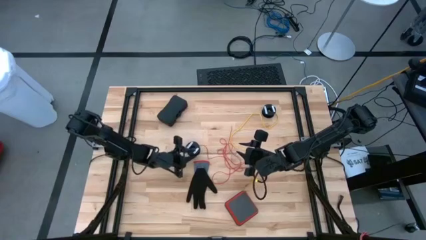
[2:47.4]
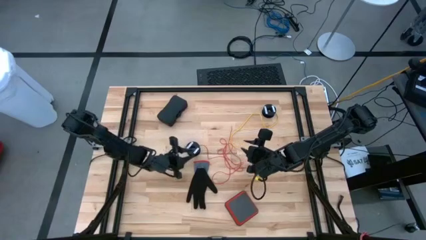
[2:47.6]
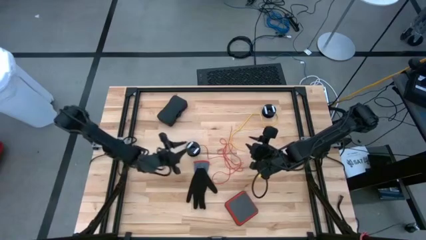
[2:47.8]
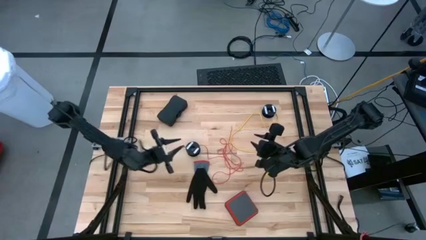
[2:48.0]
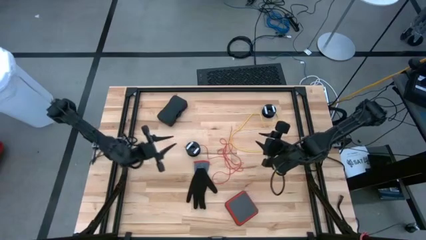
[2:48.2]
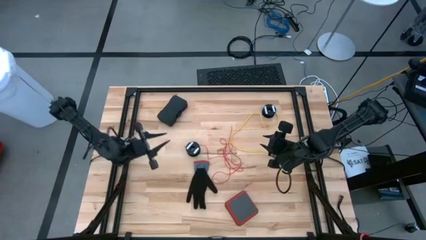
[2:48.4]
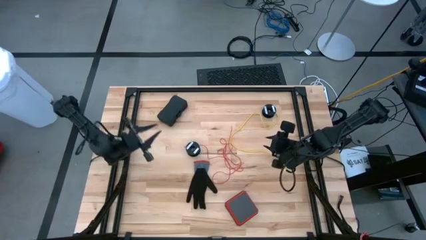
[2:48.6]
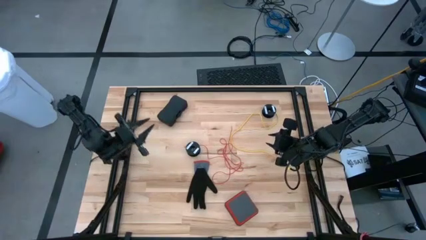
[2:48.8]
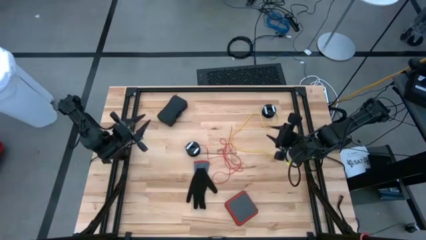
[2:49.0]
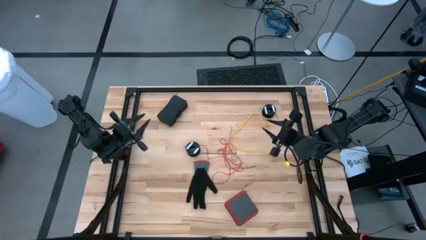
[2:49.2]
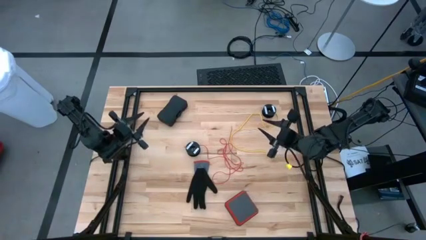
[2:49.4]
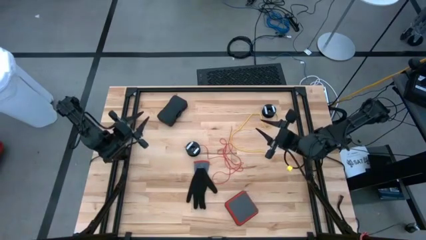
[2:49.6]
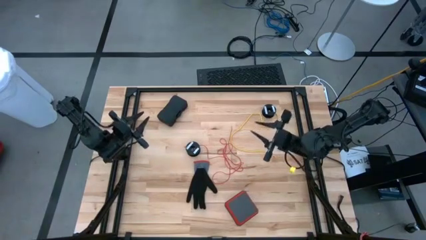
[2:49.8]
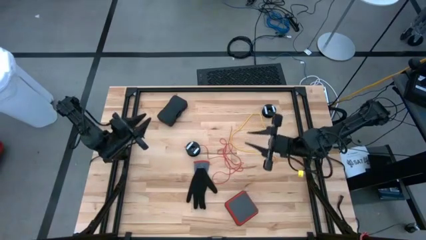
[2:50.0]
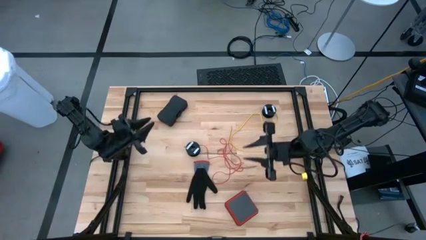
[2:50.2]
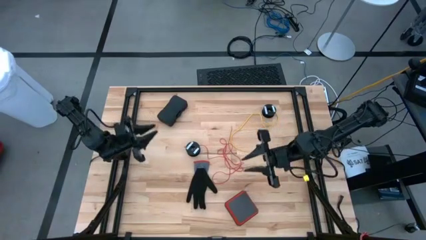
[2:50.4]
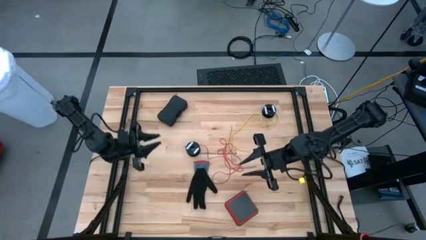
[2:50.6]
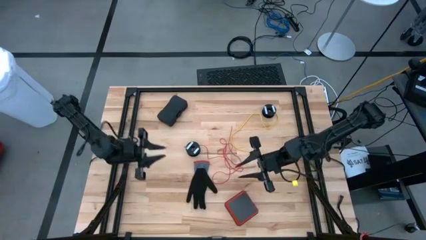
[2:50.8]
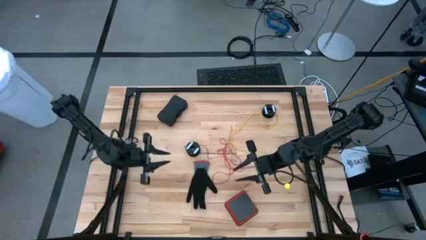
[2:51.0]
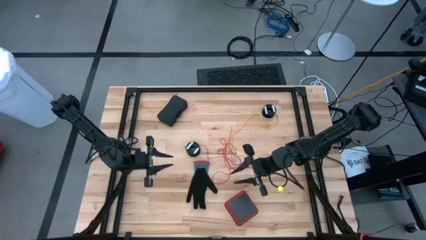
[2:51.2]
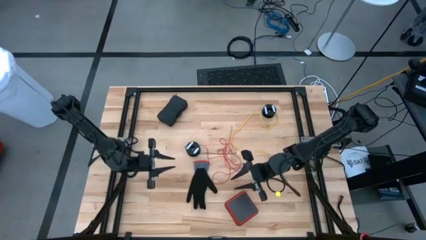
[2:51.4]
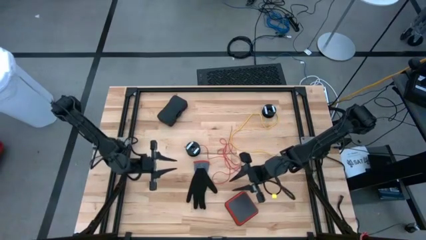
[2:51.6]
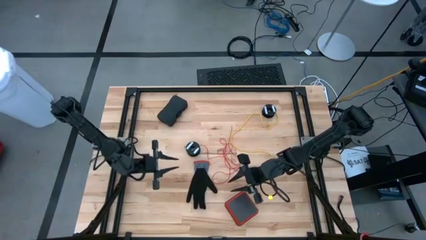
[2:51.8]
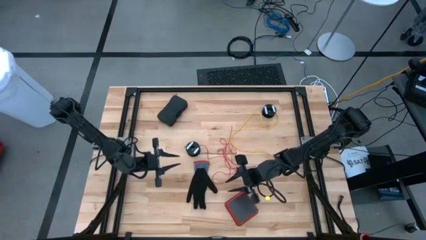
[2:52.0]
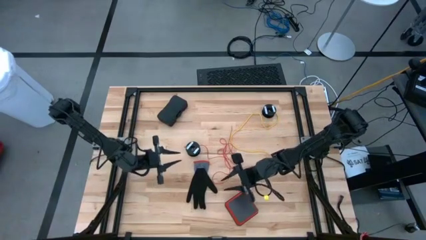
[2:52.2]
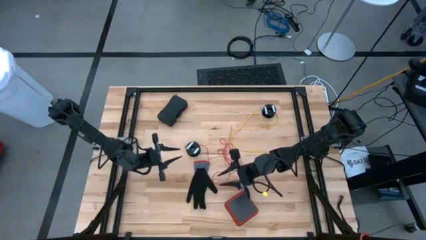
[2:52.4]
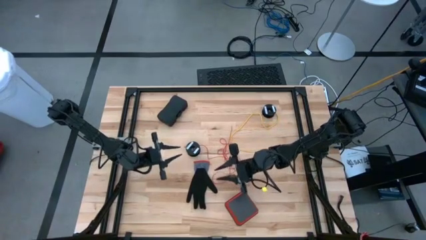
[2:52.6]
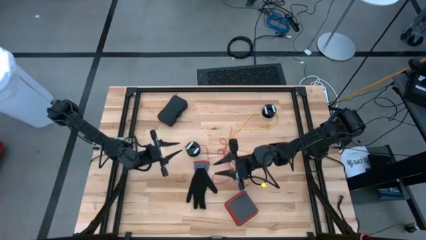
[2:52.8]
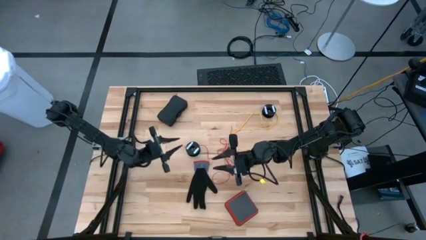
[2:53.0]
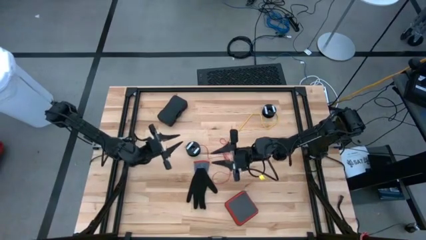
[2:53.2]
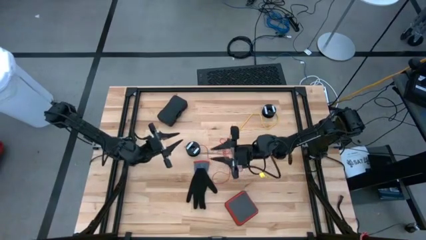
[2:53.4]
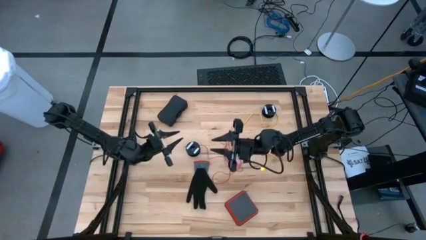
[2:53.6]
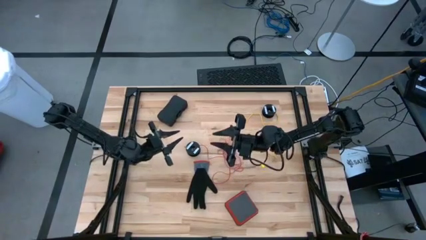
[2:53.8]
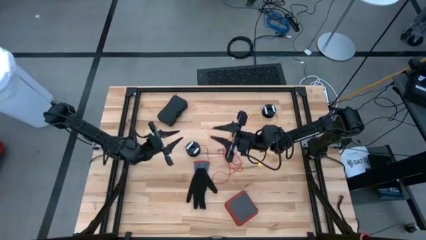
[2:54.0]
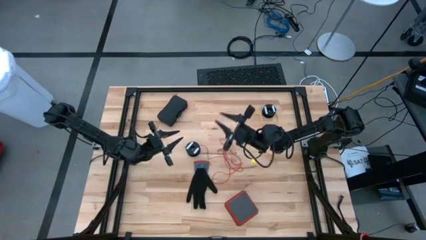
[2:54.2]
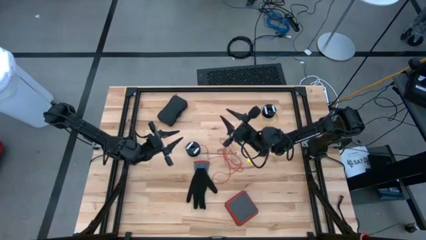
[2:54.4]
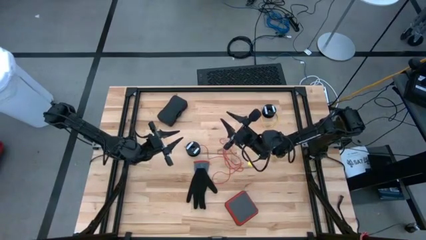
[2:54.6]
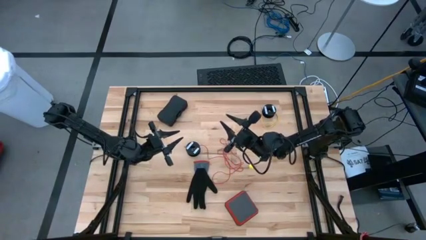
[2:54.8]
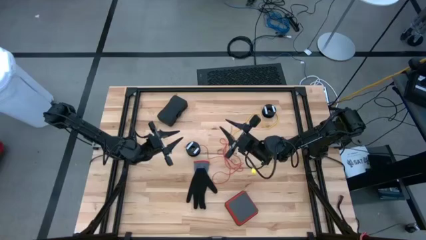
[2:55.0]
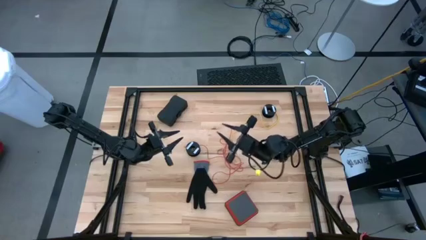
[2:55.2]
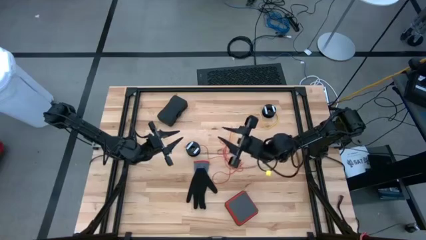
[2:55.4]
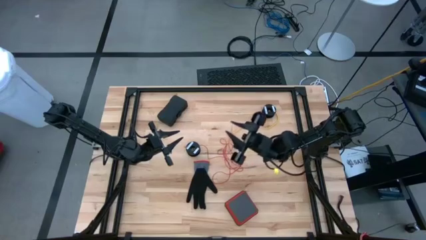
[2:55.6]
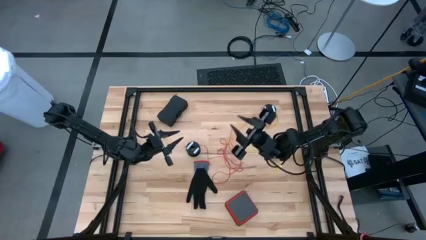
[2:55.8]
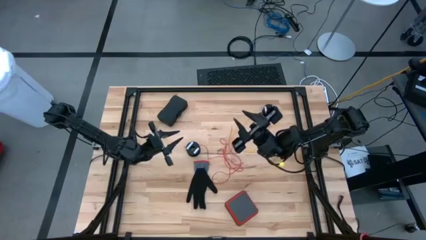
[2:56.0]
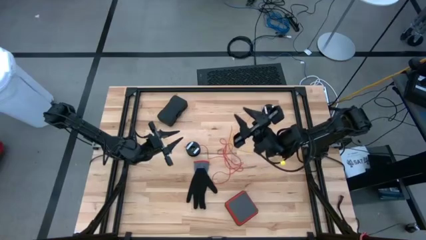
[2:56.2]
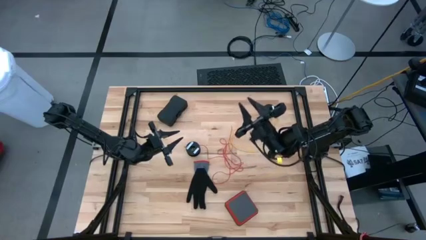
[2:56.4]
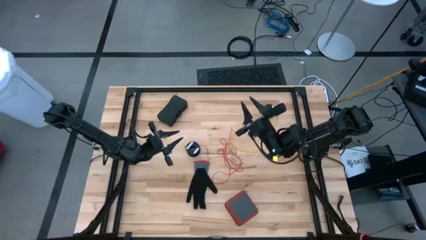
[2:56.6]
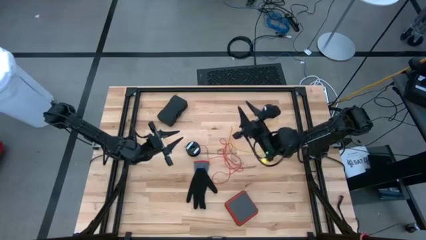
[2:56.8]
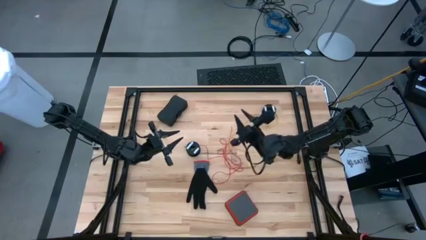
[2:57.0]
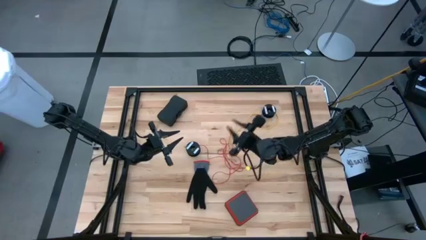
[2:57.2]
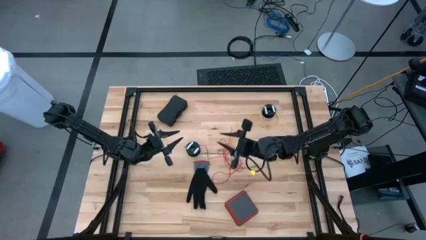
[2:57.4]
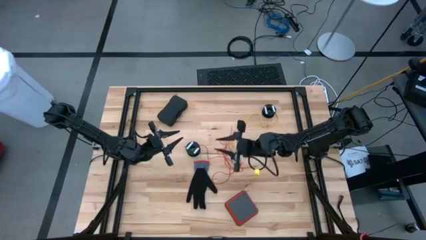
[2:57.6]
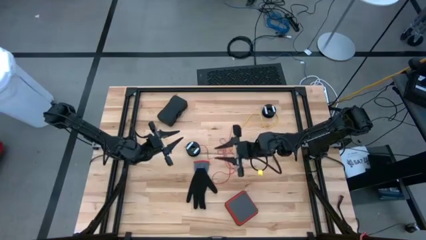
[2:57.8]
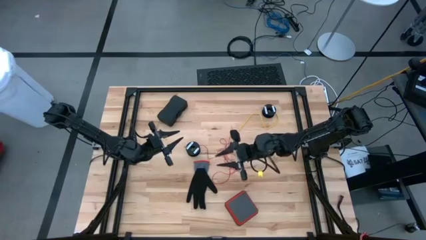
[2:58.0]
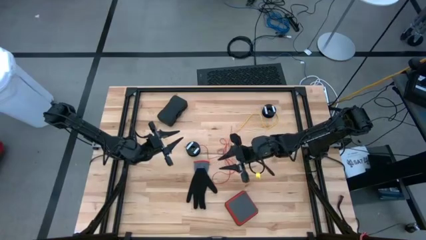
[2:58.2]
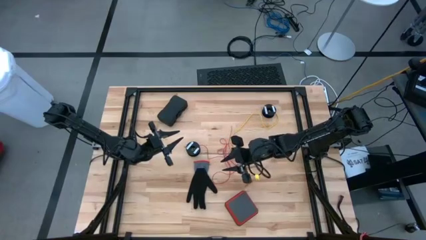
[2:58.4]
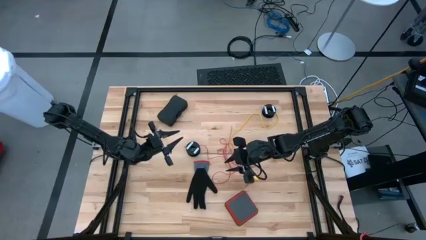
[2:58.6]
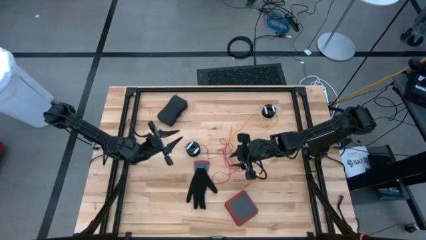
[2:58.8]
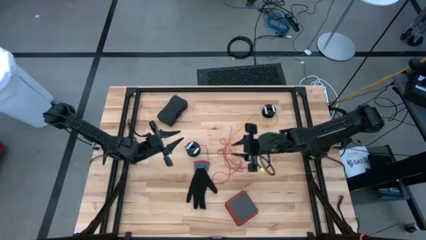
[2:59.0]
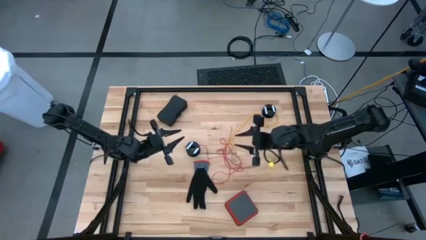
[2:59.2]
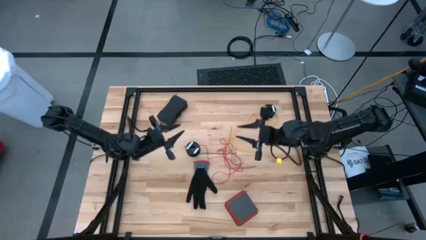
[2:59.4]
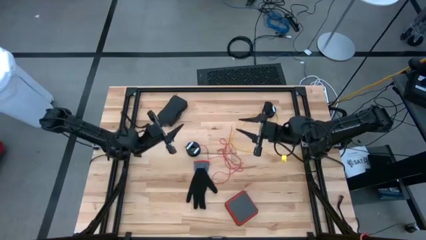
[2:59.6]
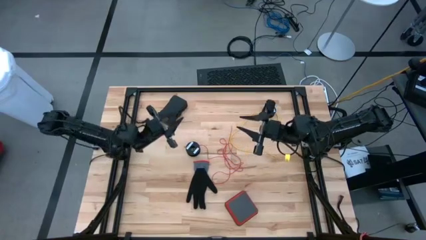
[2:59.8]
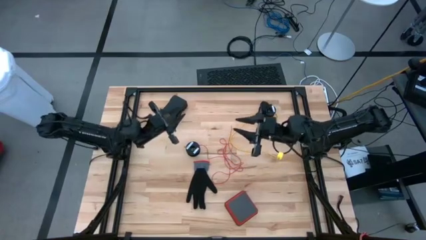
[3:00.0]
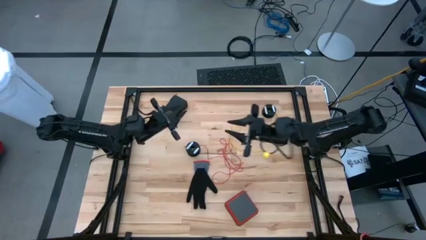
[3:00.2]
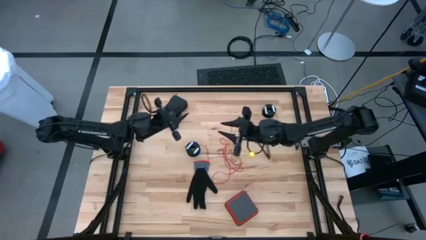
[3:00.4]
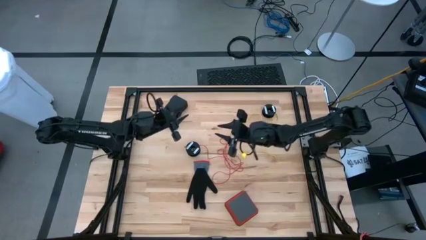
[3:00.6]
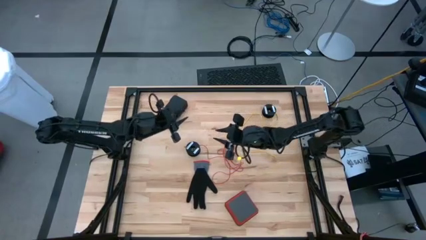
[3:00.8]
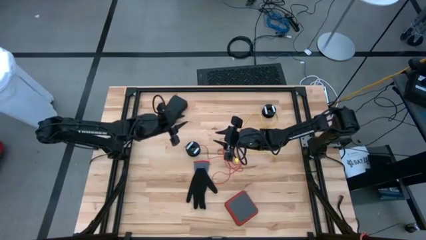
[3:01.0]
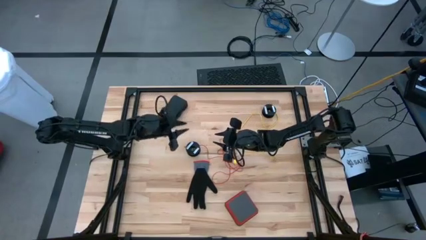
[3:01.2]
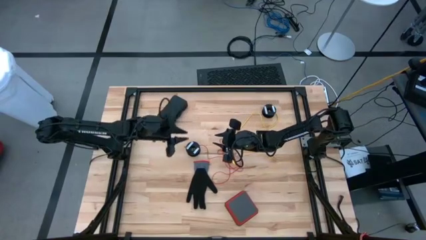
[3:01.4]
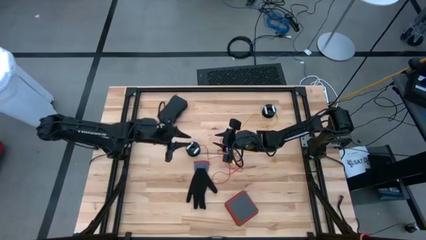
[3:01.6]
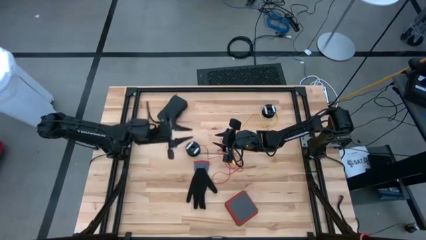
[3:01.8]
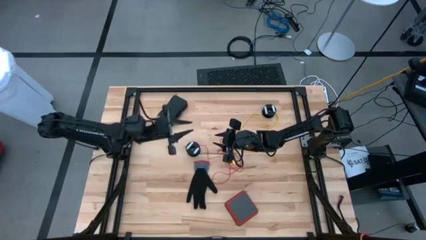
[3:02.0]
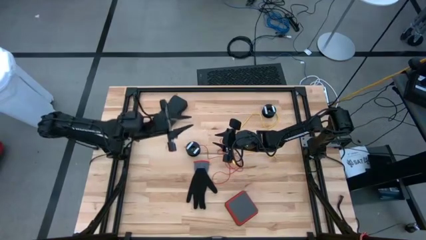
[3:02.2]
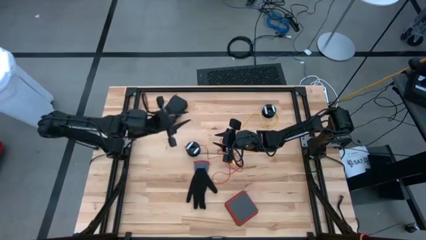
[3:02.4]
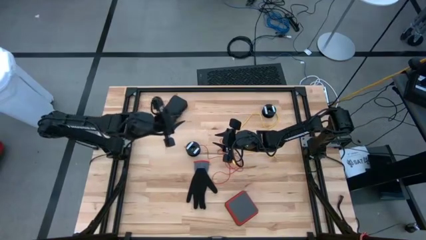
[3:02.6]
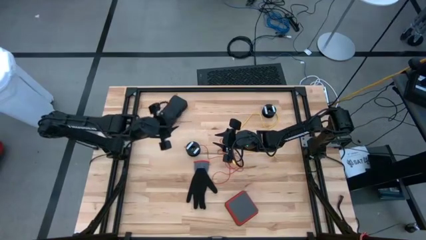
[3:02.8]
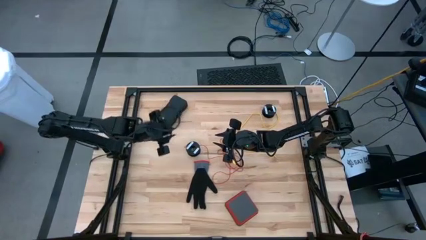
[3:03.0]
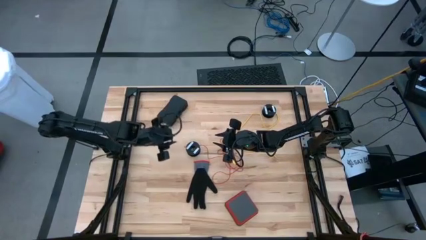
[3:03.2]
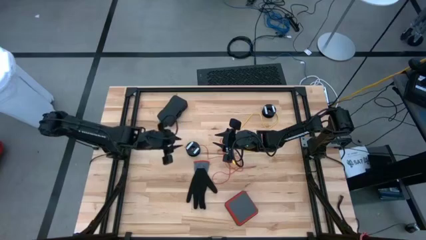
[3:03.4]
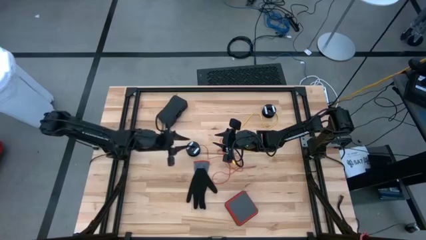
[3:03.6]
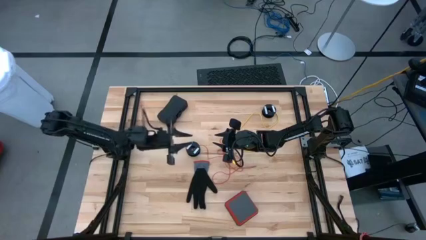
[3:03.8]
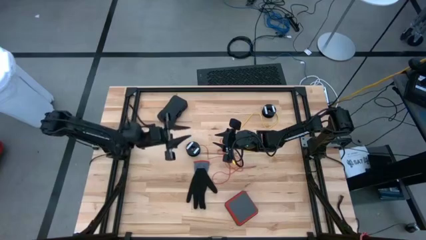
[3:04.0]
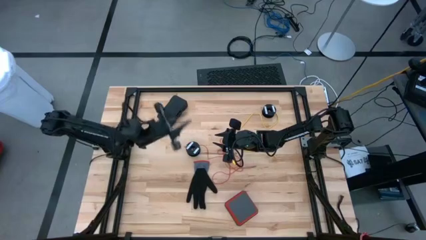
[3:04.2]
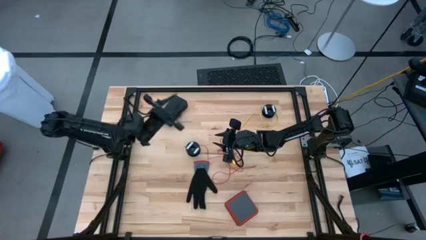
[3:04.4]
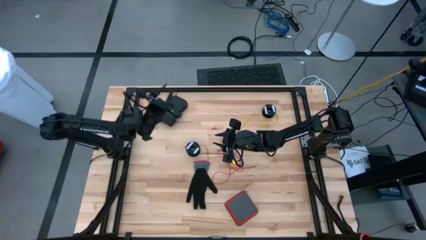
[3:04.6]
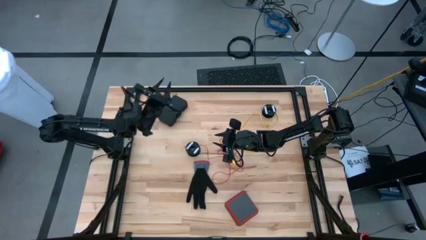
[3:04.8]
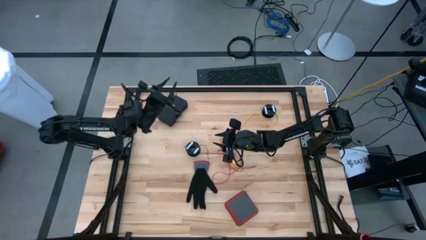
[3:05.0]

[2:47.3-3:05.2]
Task: Coil cords
Coil the red wire onto the black spool
